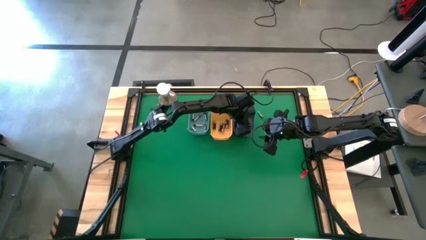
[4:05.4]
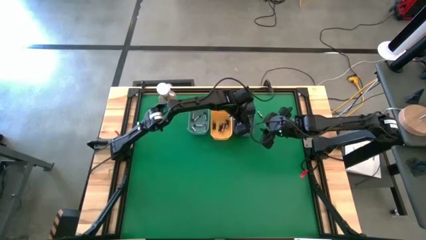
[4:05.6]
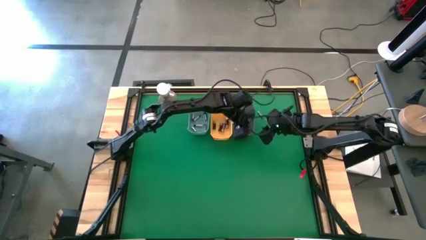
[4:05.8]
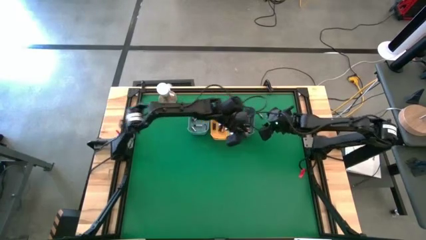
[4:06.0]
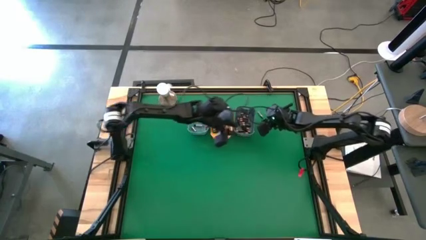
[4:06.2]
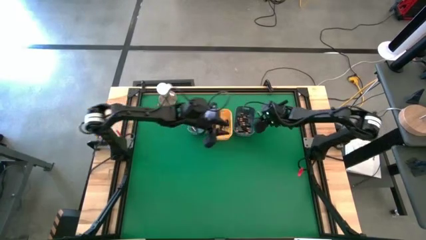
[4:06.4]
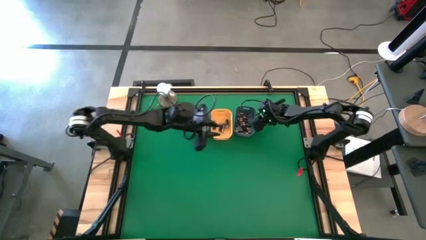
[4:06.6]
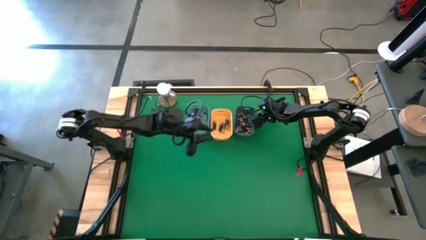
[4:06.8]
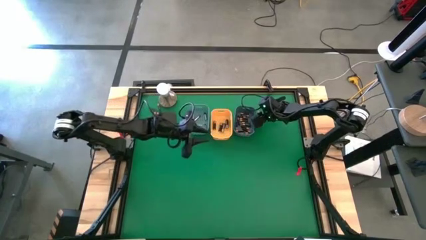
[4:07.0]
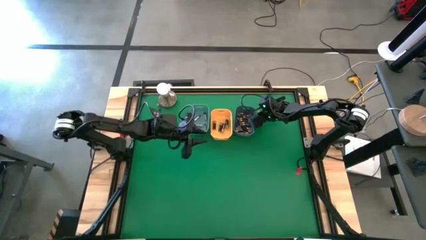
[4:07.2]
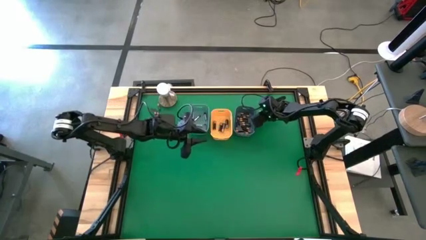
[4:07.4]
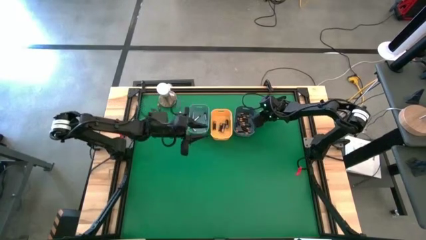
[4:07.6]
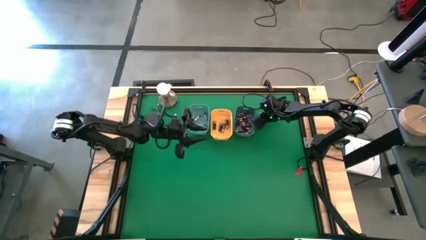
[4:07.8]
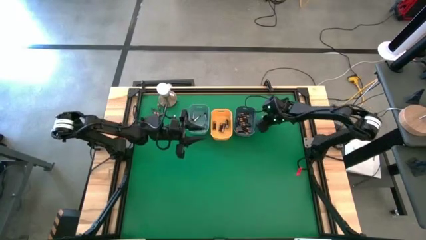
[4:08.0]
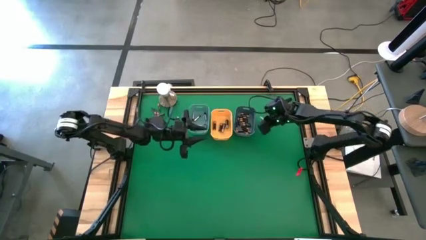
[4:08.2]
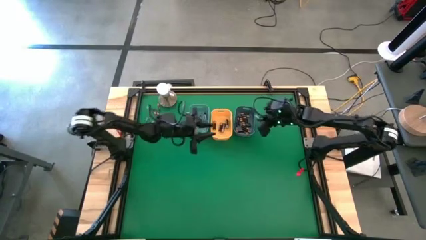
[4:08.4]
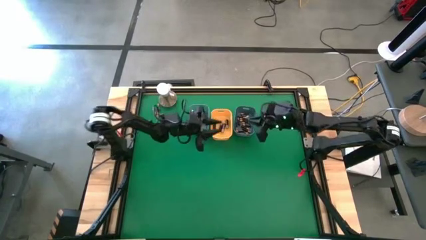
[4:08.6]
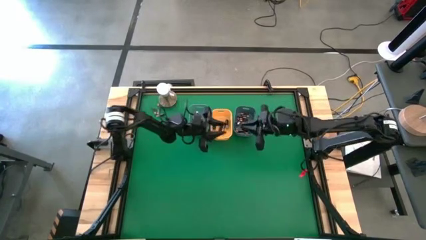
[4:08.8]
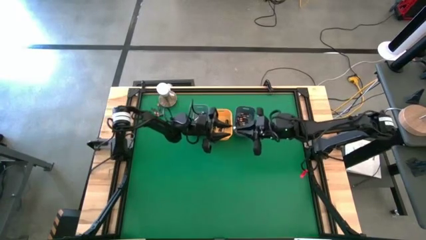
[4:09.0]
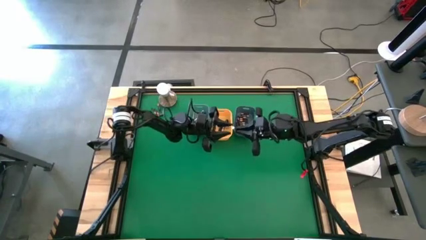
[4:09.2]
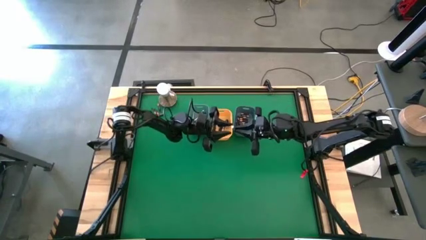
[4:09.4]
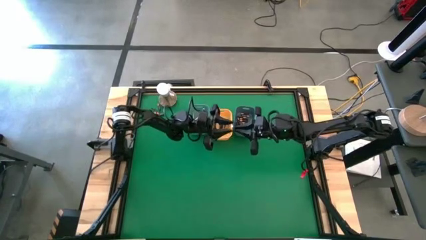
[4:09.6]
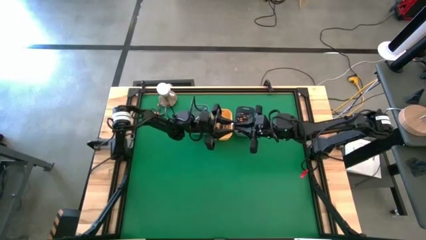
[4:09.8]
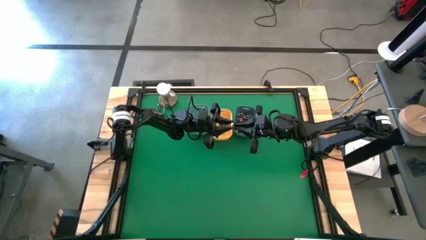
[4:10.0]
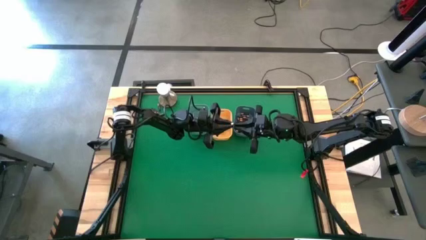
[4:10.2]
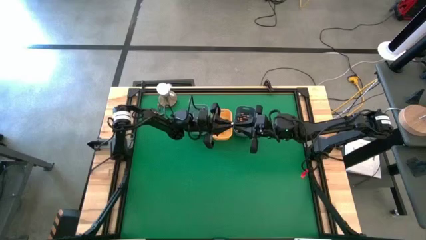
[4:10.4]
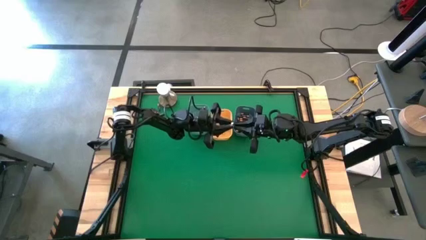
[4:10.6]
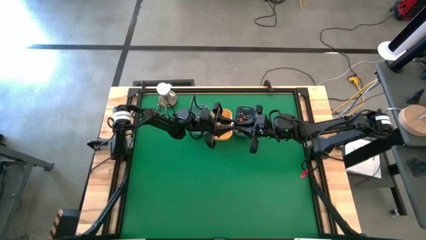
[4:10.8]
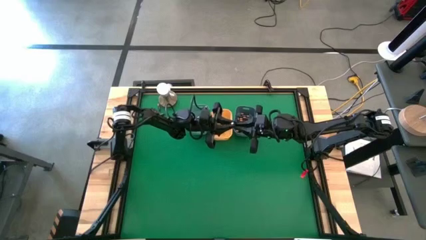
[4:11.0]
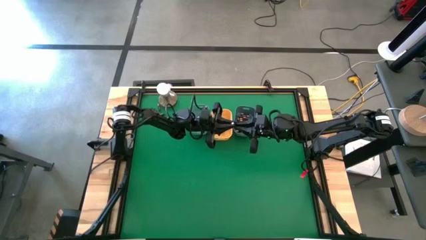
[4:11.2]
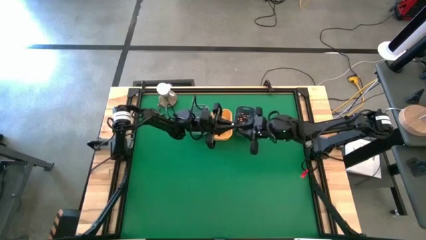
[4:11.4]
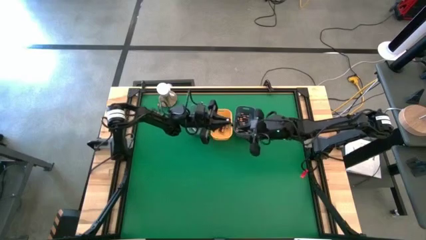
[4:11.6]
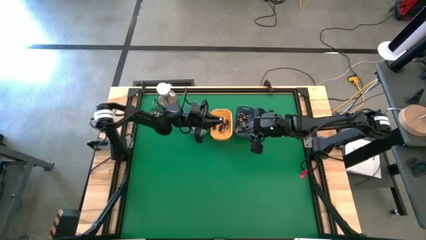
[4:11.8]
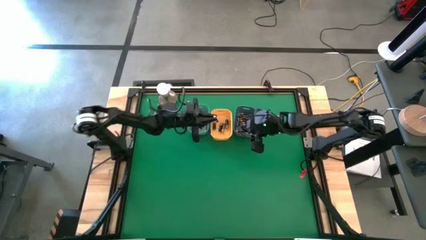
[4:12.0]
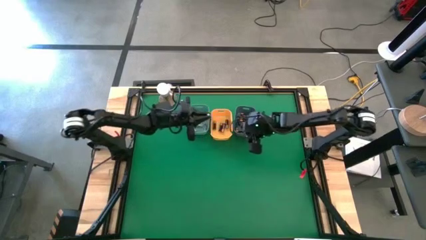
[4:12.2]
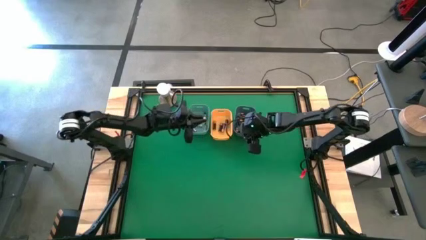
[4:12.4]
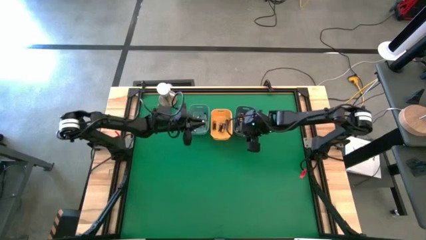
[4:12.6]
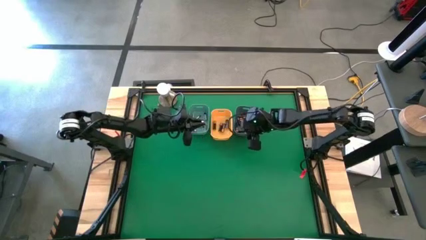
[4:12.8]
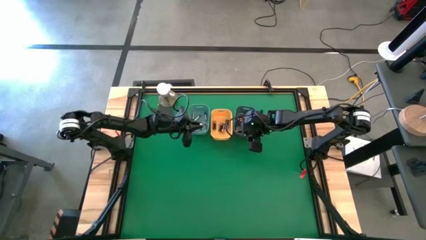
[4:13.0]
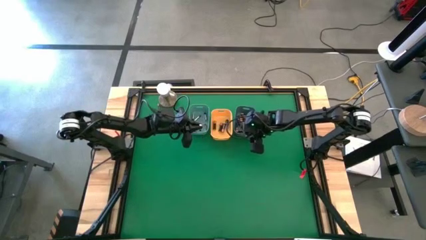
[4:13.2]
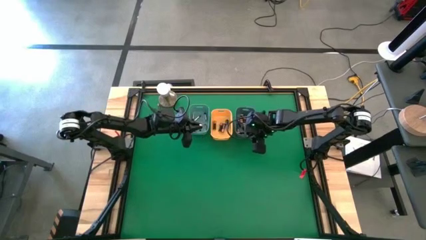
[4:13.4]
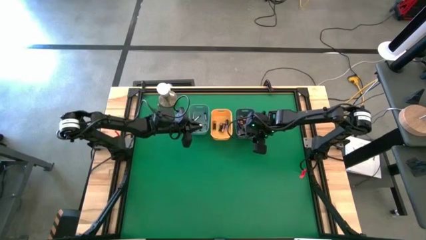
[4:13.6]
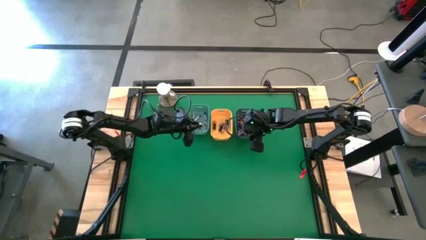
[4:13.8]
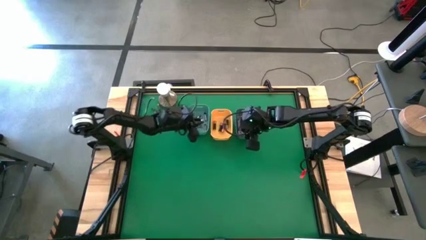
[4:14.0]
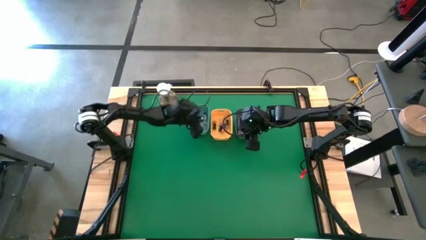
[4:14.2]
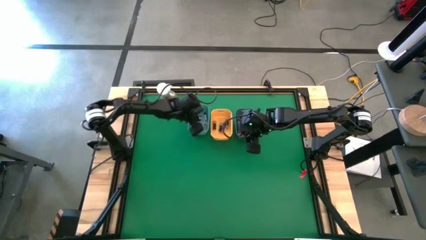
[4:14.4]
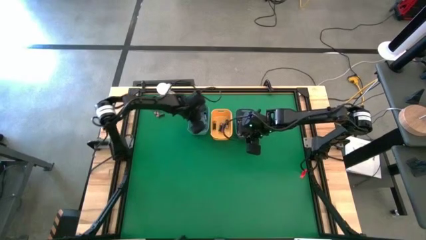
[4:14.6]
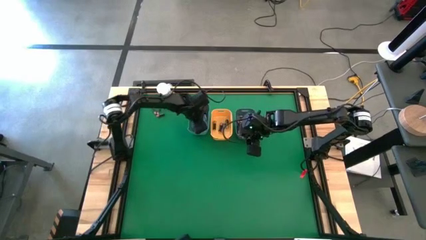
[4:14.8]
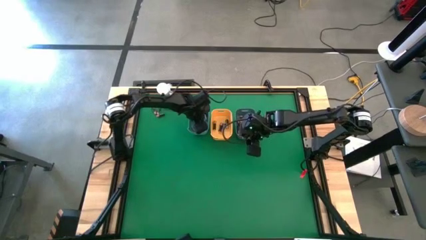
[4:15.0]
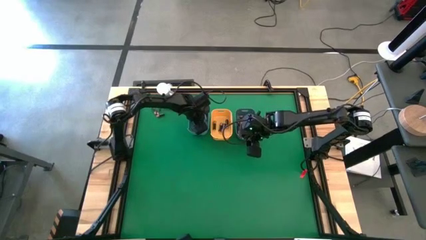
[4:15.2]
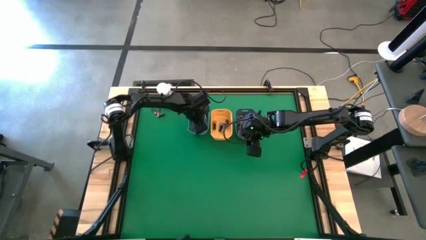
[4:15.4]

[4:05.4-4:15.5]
Task: Sort batteries
Put the silver battery into the green bin

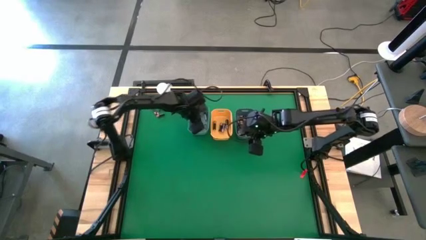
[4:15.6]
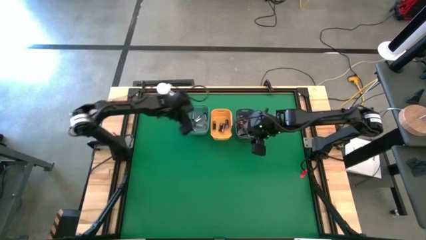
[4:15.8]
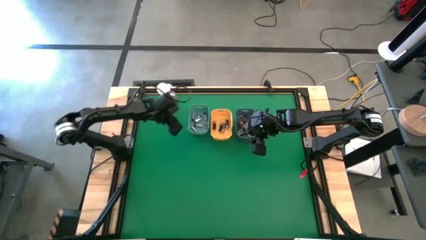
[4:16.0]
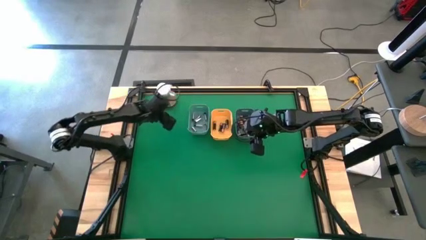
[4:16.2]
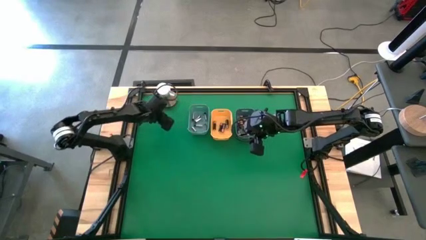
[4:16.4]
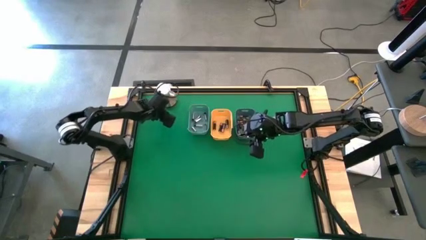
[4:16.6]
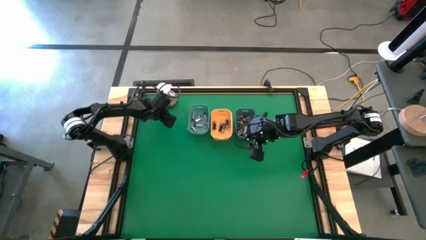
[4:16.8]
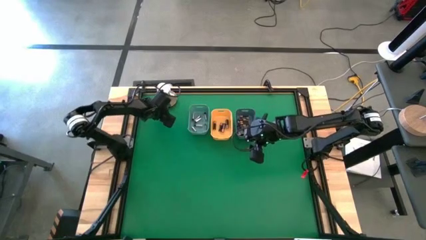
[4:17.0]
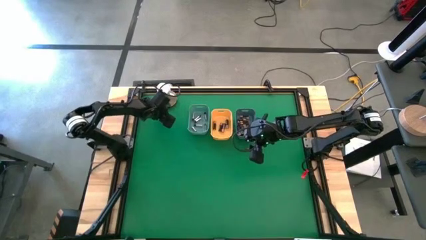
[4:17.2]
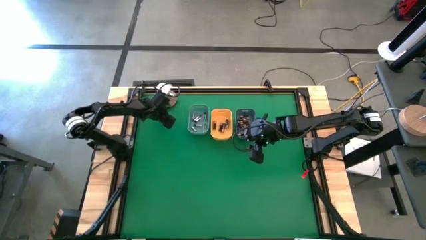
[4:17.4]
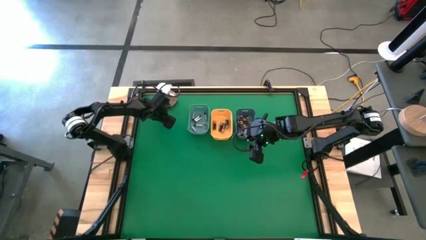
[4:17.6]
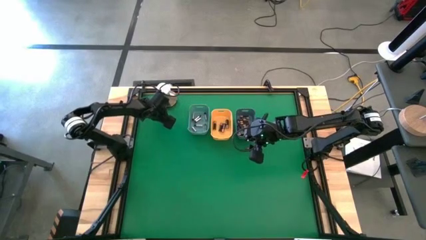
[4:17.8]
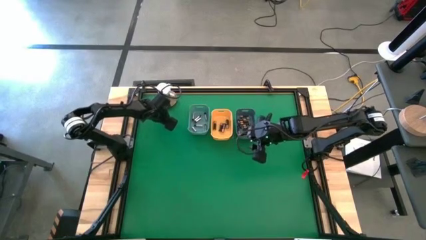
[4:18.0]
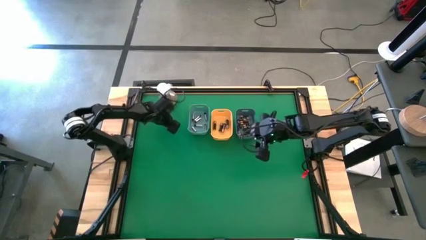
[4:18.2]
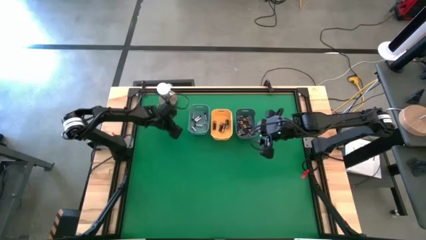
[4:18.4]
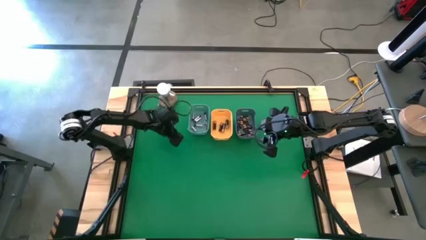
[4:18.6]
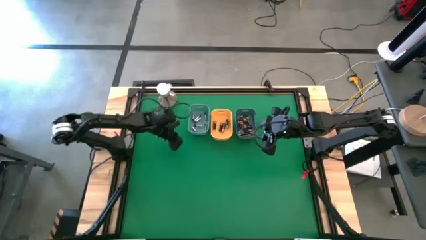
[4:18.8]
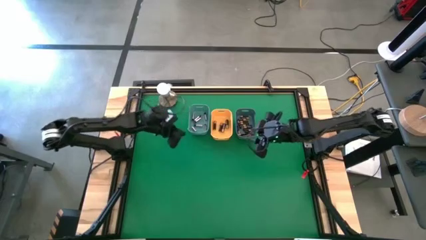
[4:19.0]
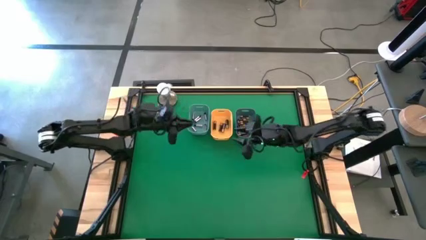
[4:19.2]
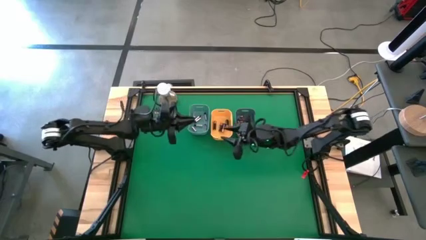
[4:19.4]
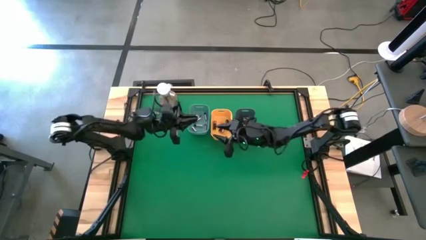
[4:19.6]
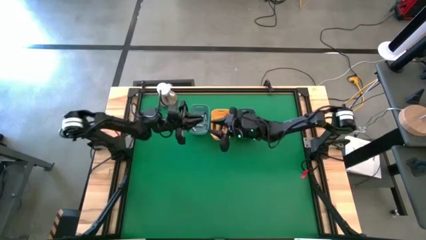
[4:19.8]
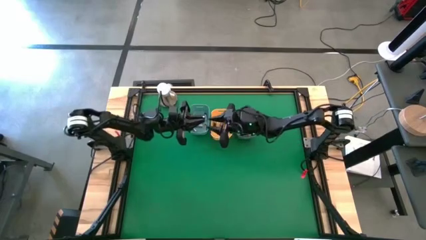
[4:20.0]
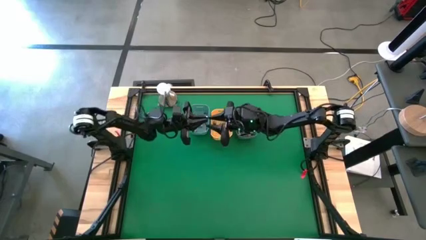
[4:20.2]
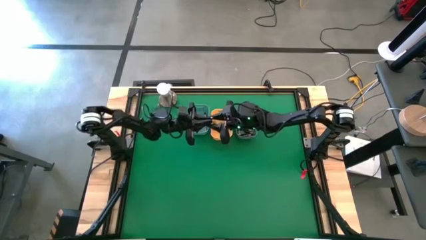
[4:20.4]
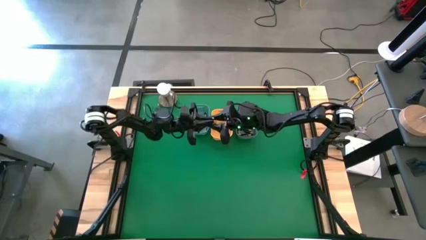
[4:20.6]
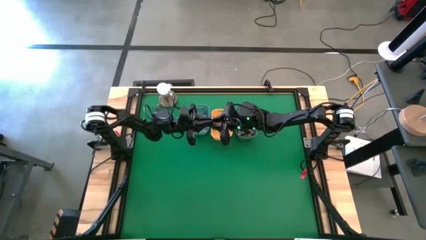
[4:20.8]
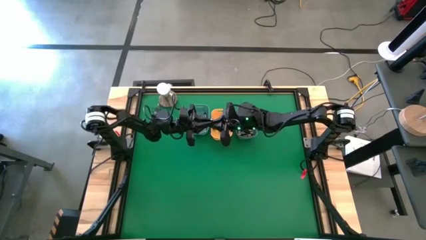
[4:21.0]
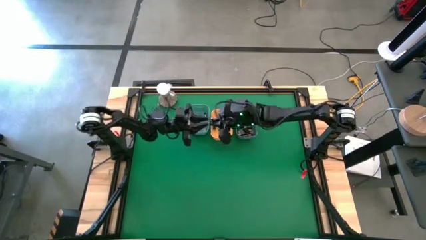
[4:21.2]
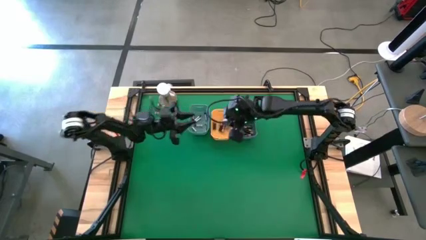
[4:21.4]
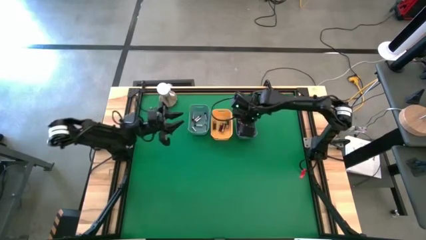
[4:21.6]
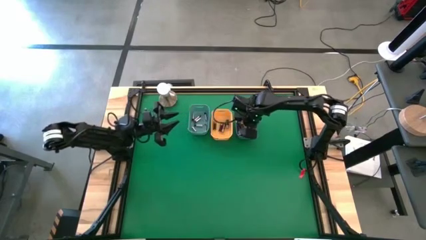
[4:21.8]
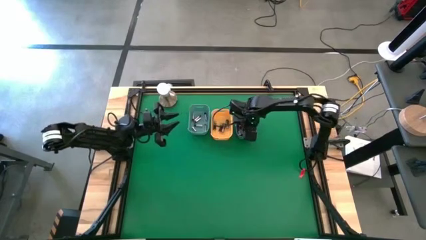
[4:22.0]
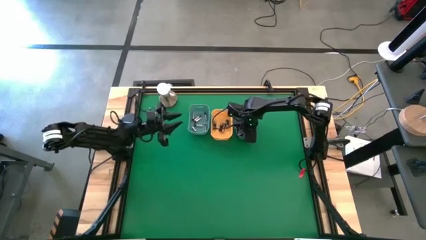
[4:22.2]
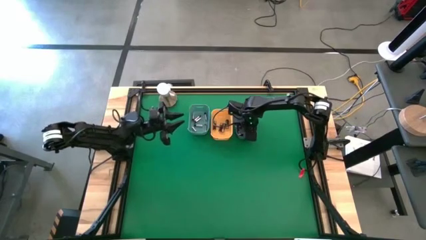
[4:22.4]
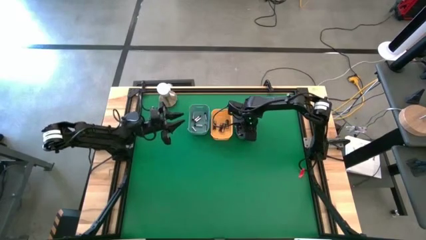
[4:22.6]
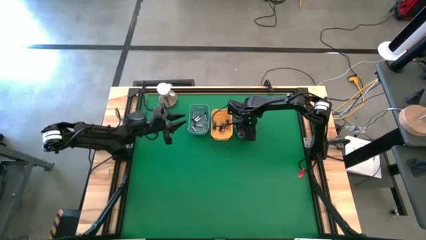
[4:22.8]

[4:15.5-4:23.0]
Put the small black battery into the blue bin
